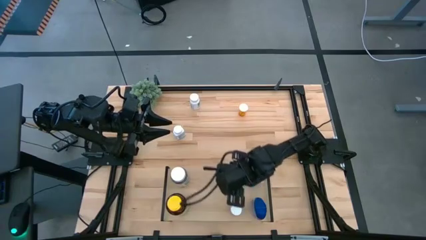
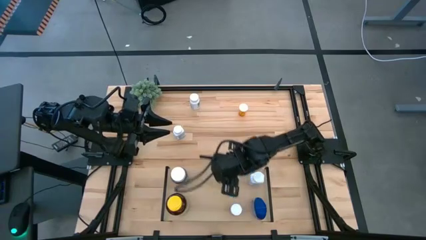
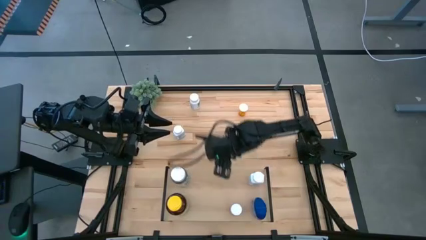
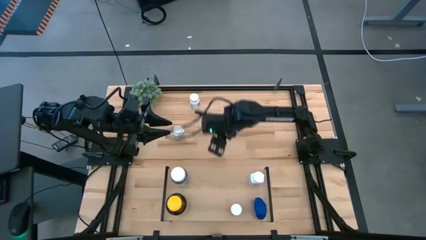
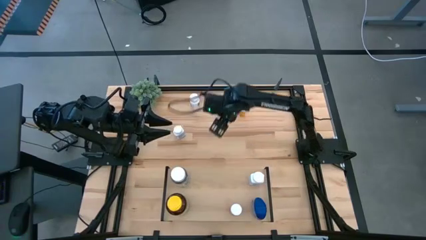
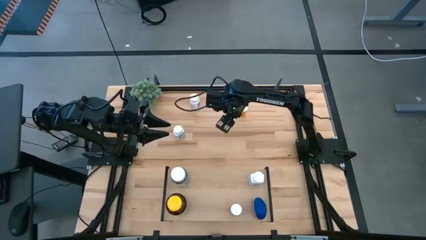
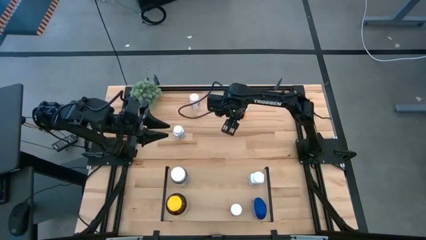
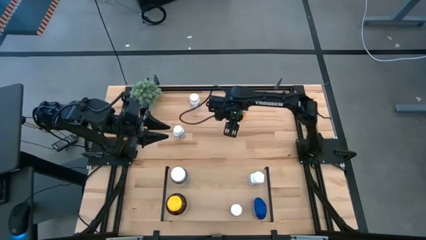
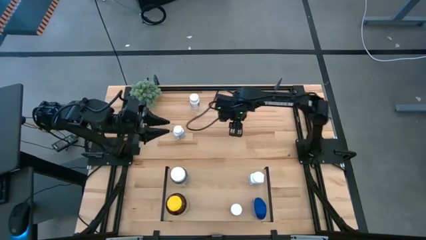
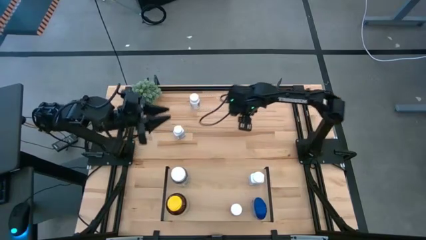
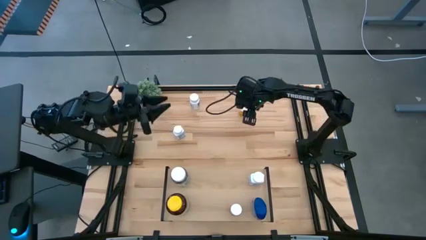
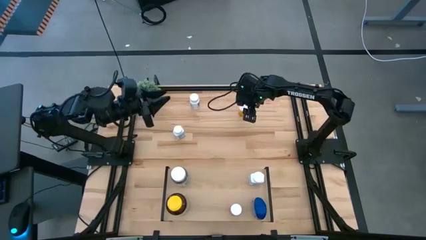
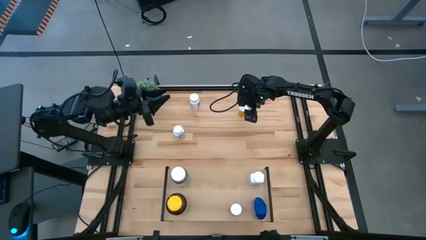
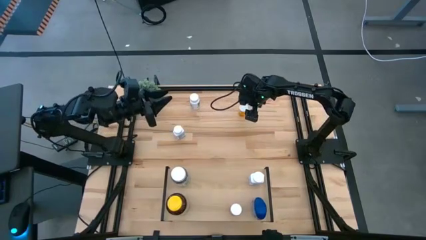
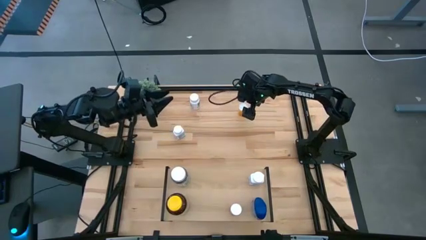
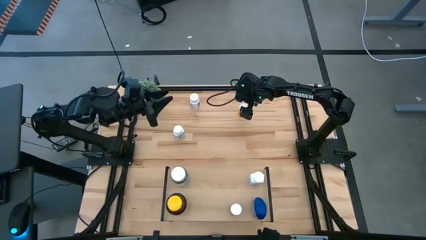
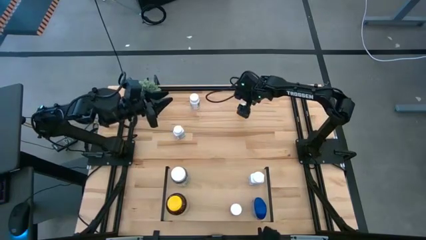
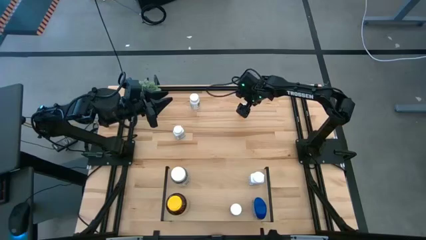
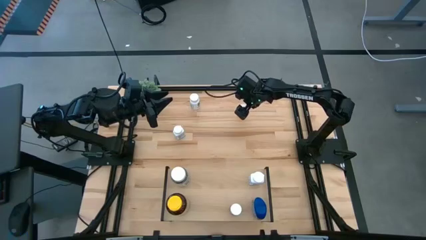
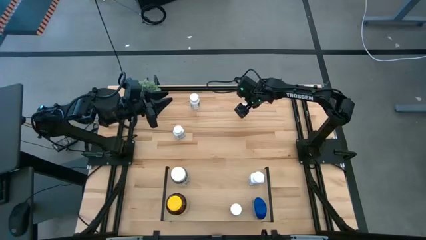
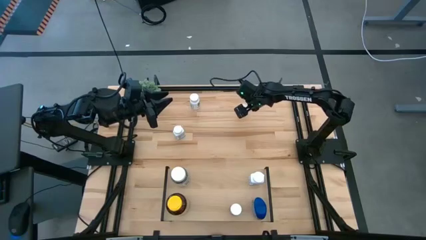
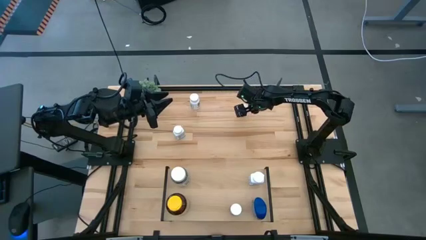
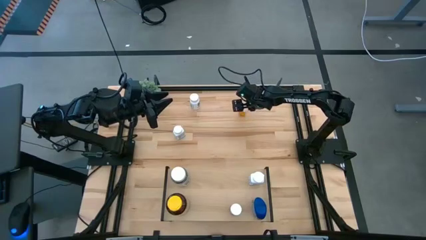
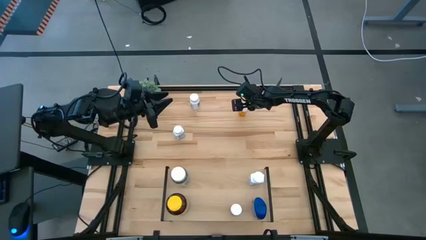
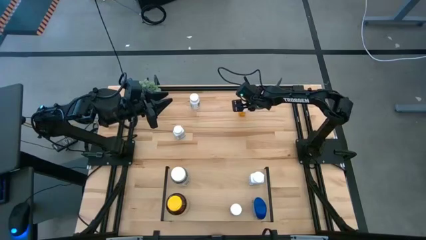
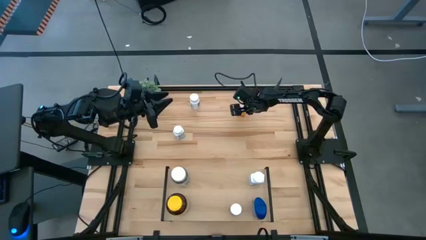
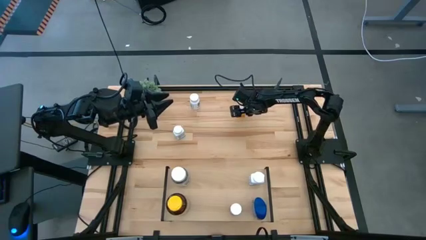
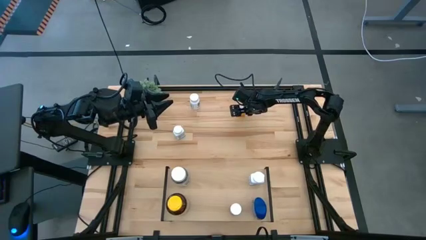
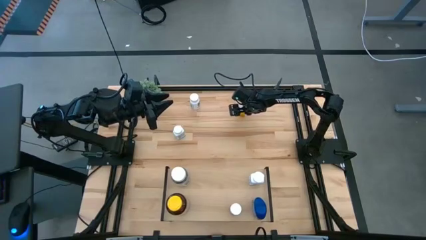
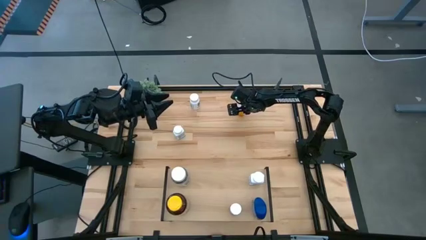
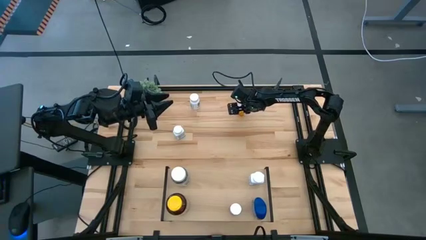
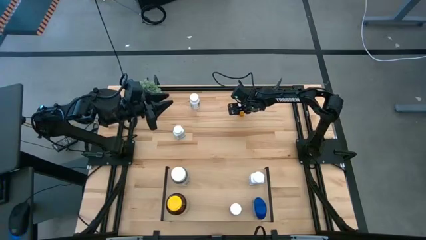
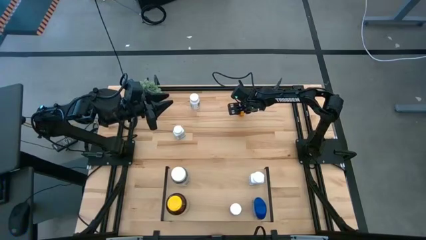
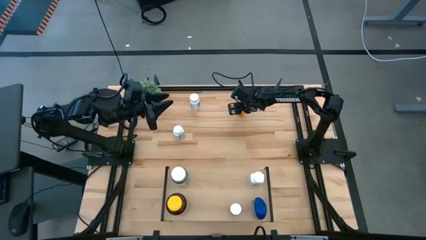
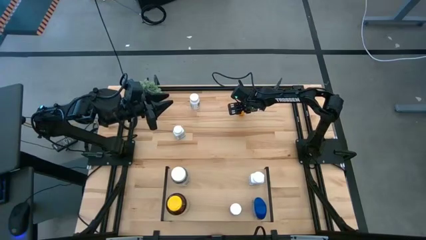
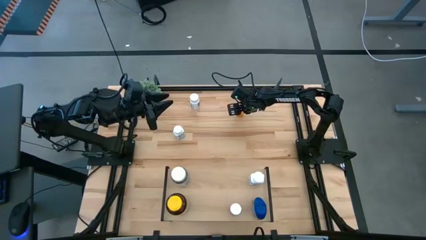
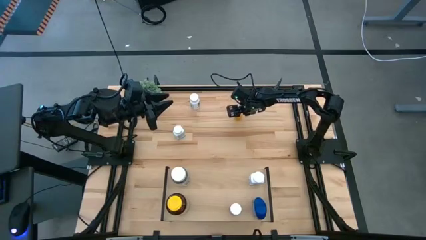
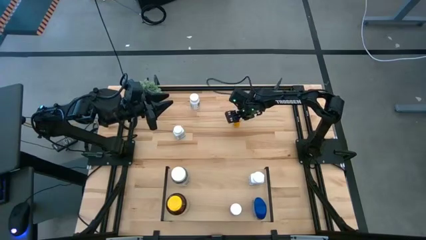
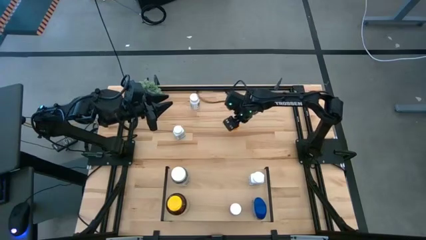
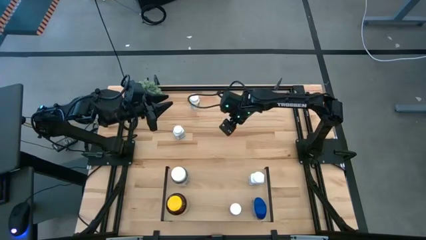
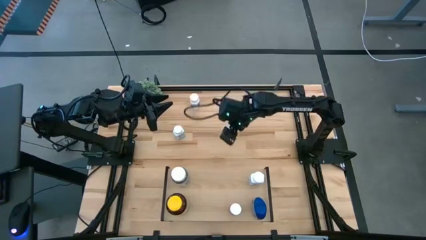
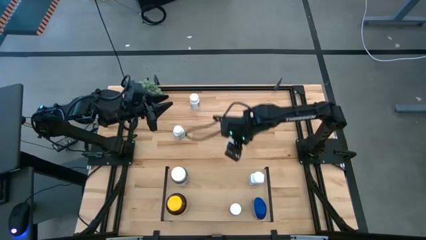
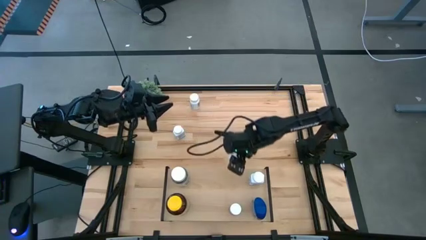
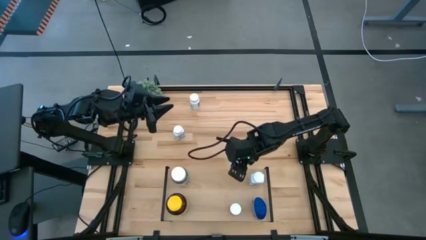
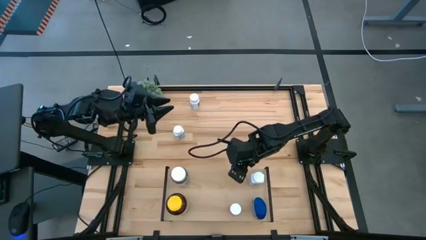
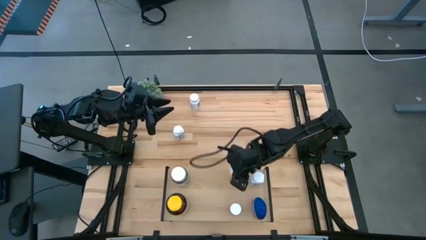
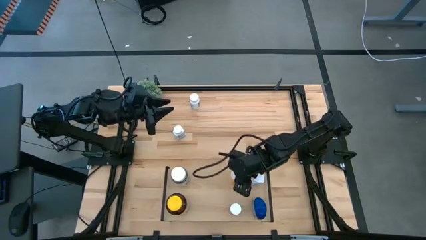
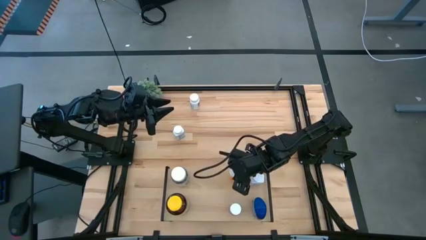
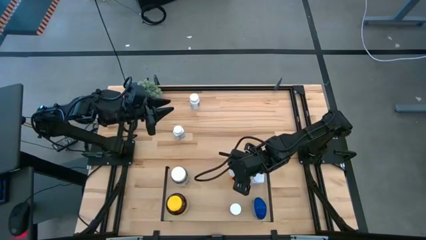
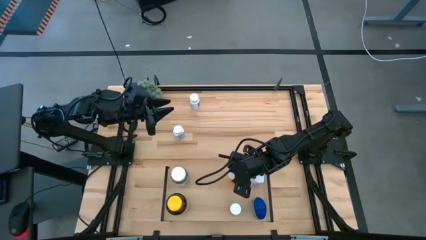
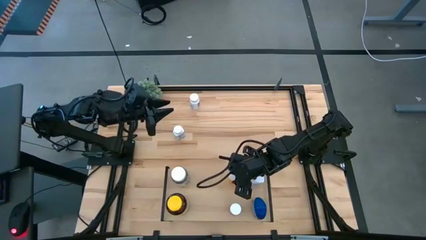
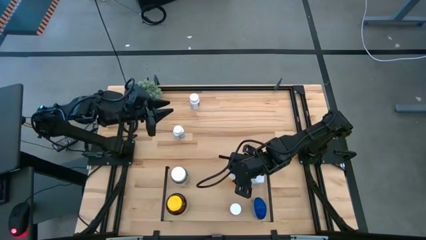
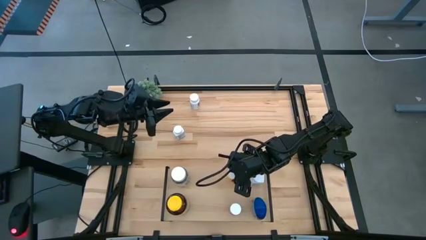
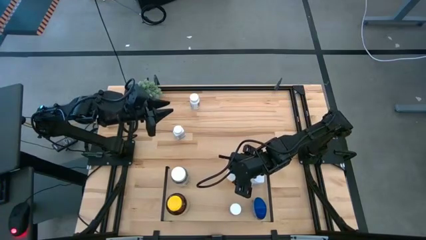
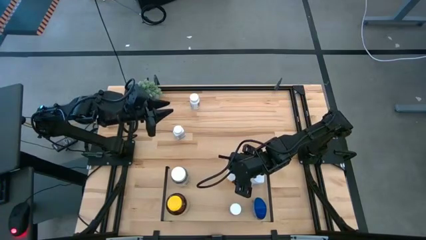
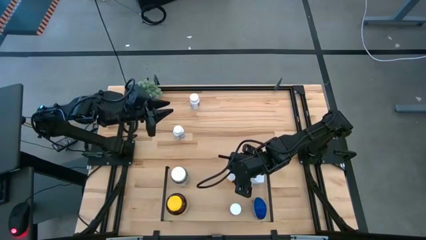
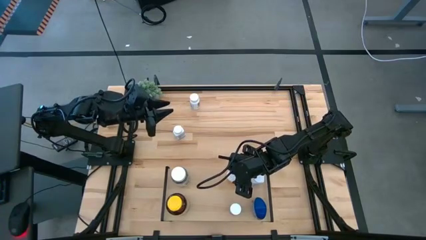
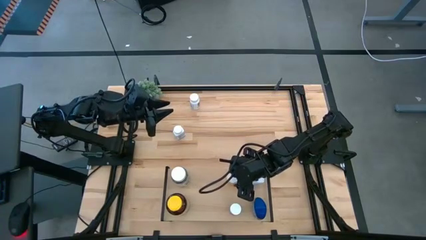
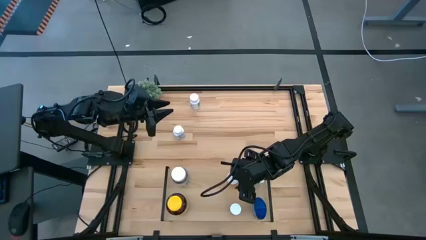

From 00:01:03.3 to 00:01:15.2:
Task: Pick and place medicine bottles onto shelf by color
Put the orange pill bottle on the shelf
